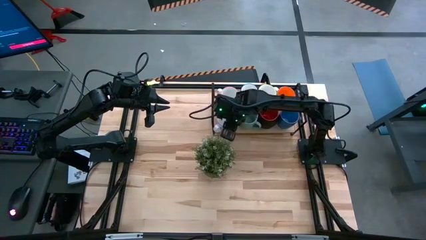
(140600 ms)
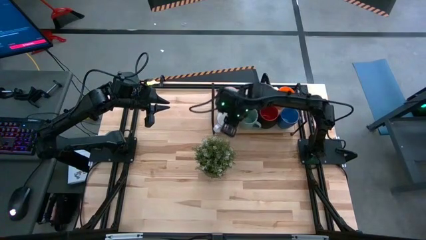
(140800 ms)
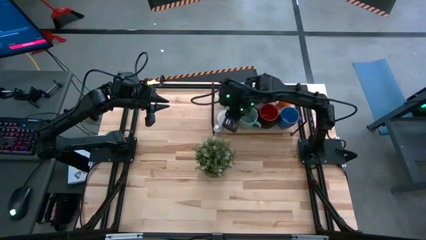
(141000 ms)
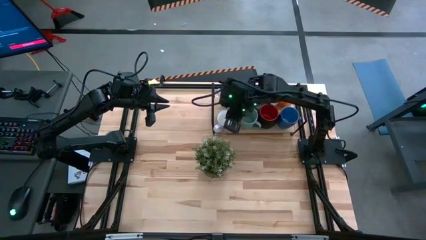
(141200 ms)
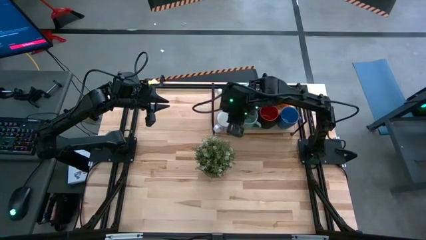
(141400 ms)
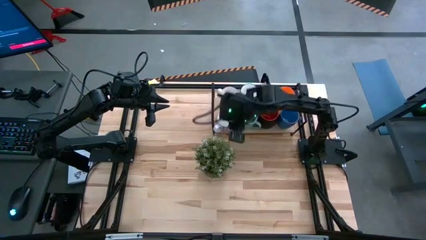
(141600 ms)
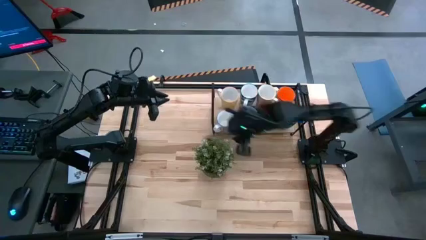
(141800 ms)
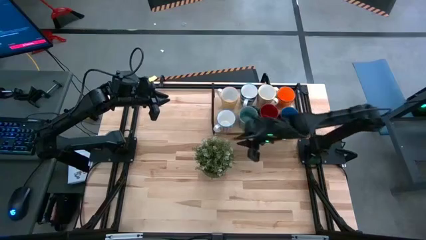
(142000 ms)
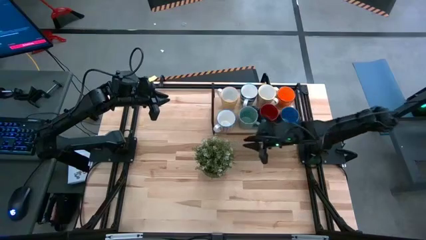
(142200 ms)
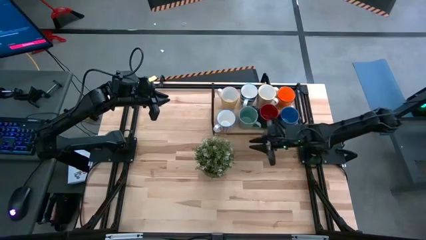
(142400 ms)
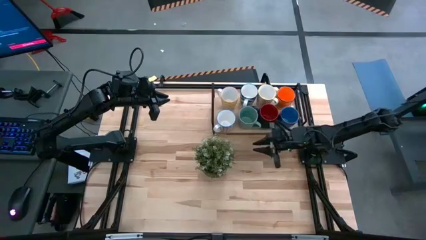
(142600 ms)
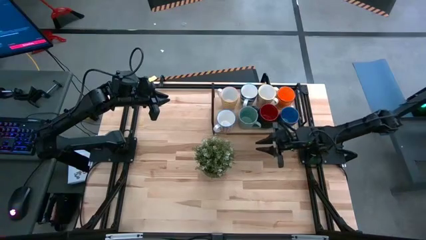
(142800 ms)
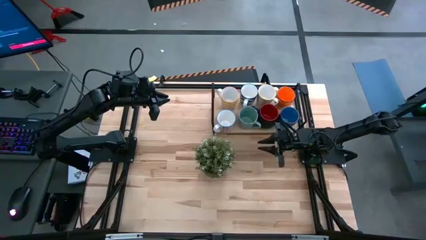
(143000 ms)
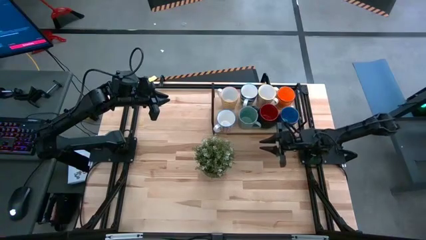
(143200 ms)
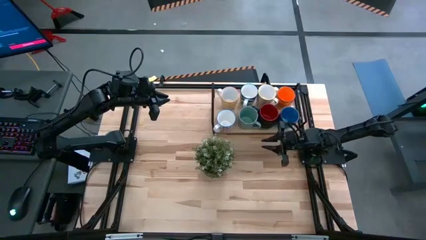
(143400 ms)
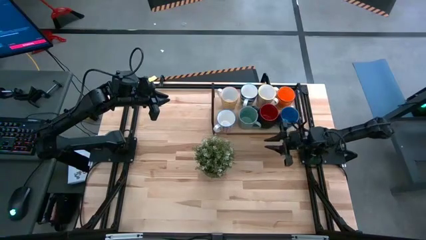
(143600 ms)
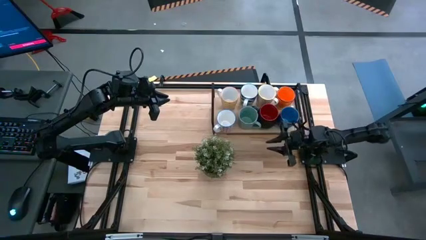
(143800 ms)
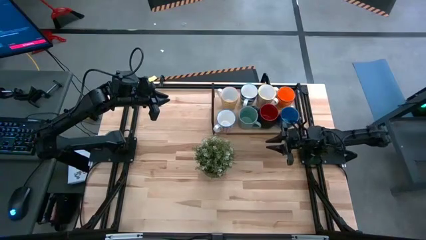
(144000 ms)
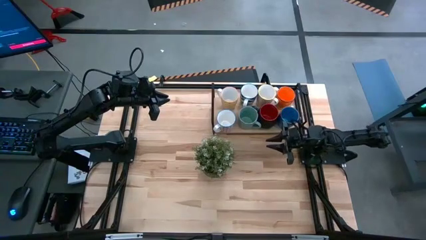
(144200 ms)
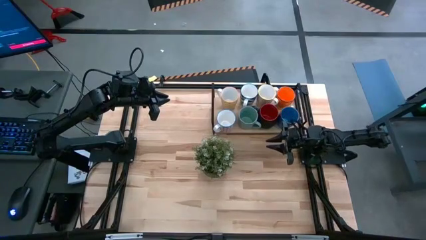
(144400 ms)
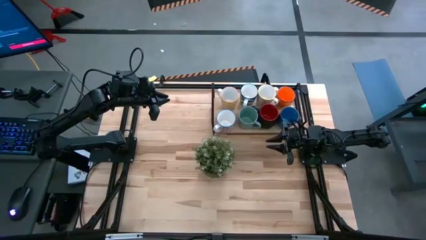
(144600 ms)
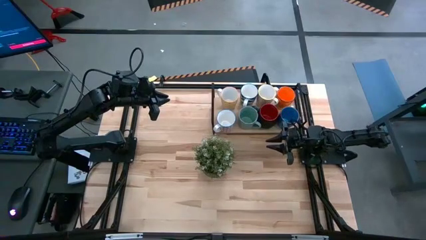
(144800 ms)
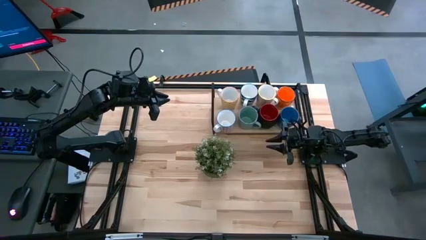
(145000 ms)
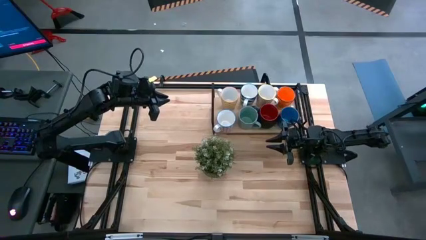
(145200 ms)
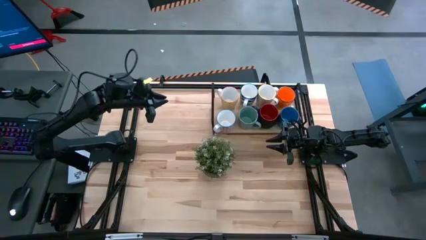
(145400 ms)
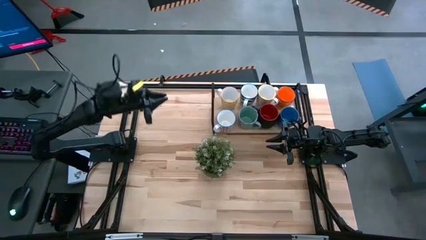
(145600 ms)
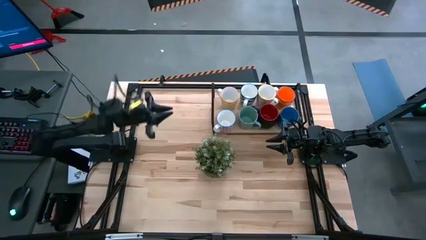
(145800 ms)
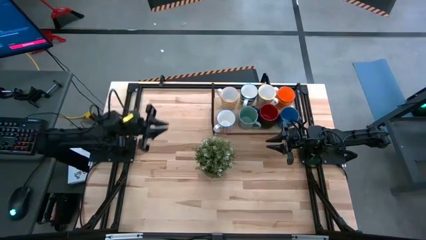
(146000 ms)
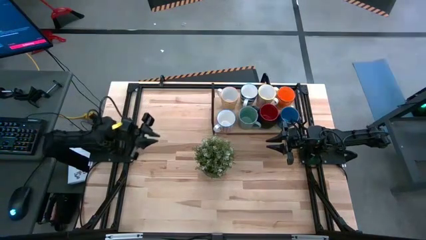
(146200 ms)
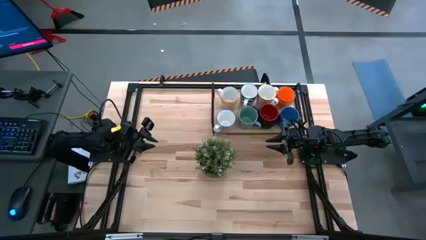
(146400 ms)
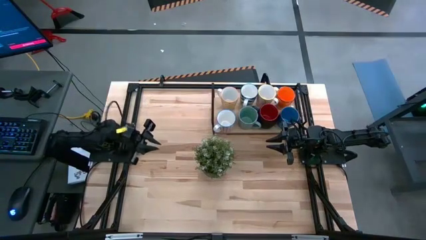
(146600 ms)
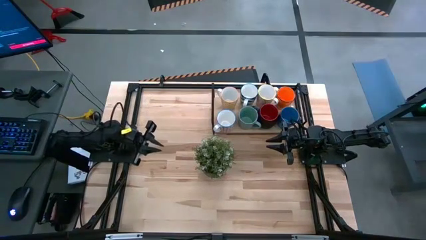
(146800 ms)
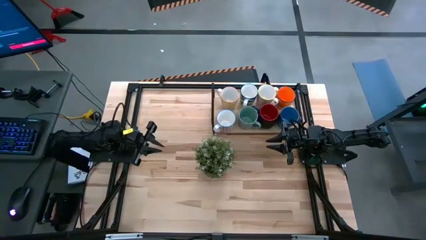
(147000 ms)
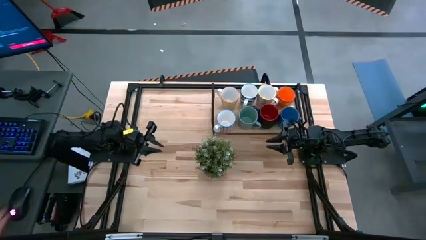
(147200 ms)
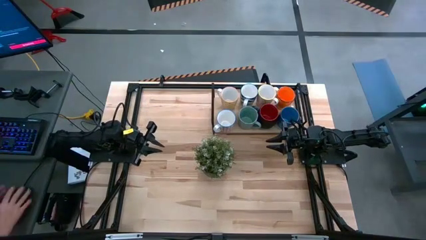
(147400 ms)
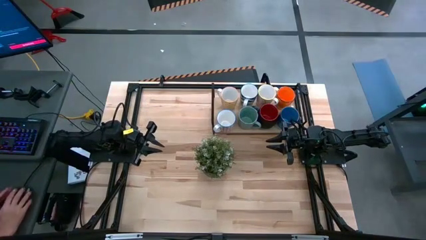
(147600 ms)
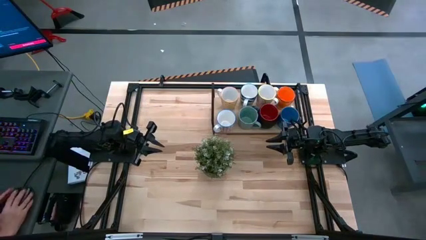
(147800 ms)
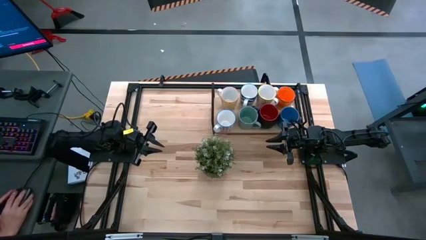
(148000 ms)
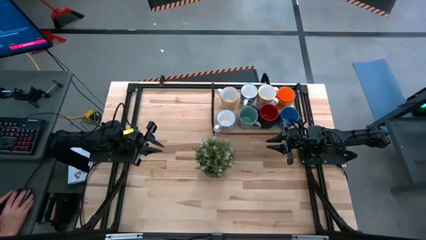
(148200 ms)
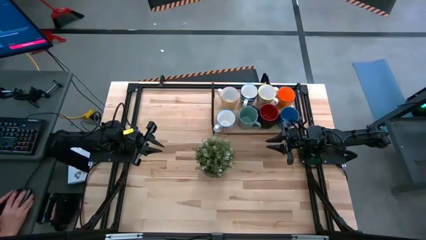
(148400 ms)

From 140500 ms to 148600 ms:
Task: Place coffee mugs
Return to Home Position

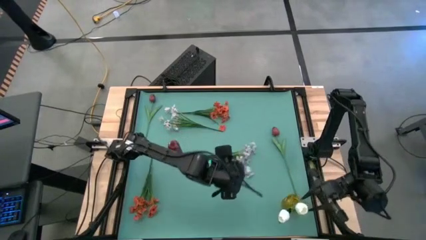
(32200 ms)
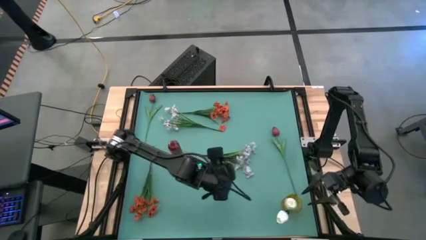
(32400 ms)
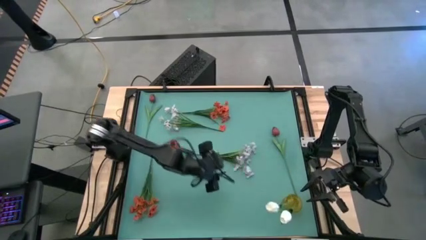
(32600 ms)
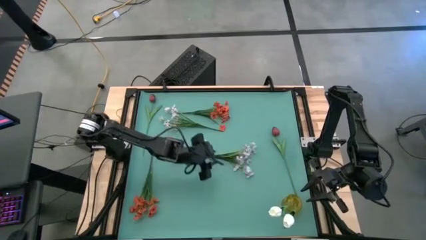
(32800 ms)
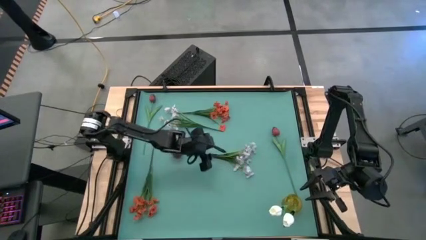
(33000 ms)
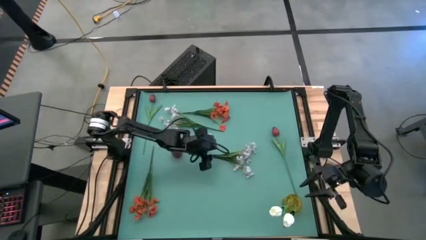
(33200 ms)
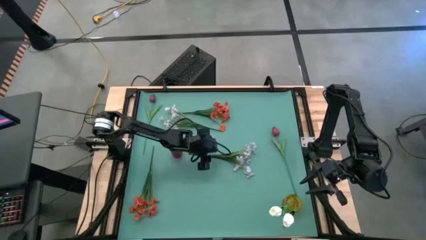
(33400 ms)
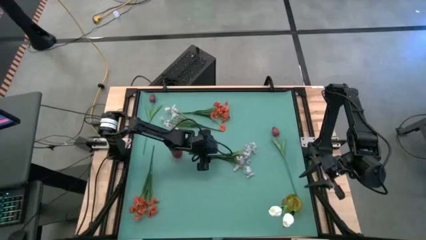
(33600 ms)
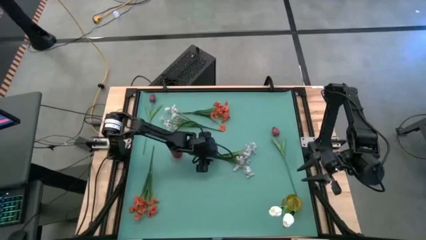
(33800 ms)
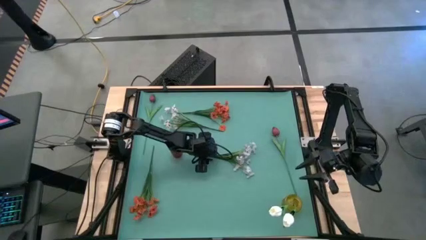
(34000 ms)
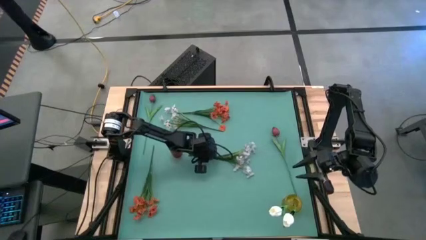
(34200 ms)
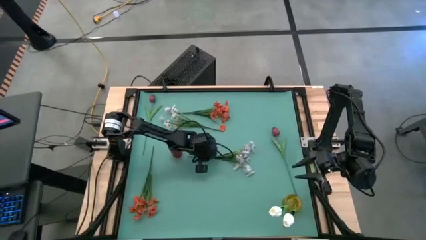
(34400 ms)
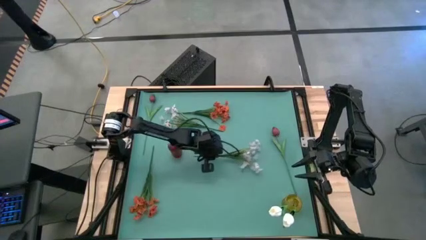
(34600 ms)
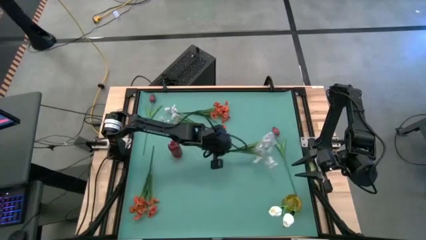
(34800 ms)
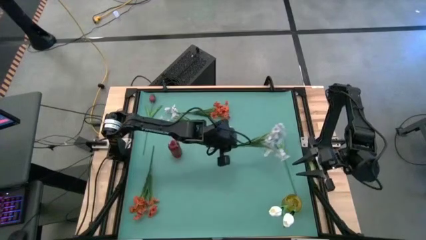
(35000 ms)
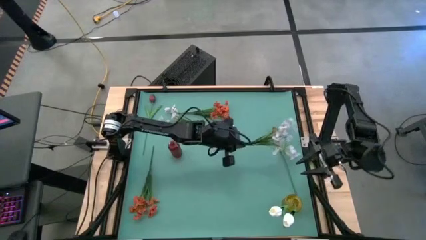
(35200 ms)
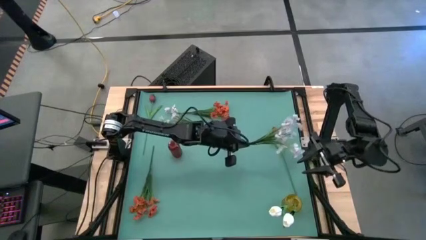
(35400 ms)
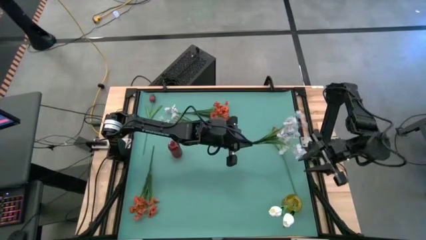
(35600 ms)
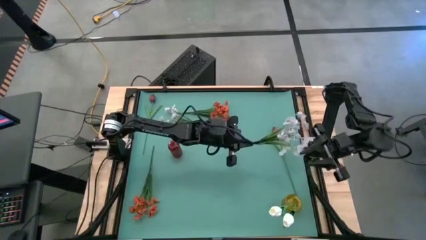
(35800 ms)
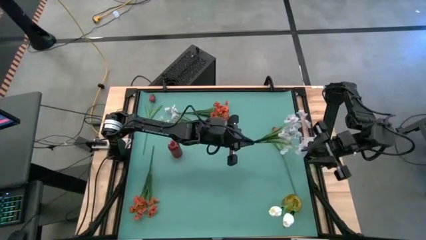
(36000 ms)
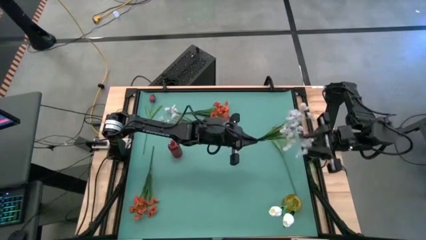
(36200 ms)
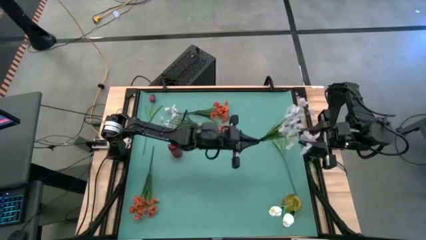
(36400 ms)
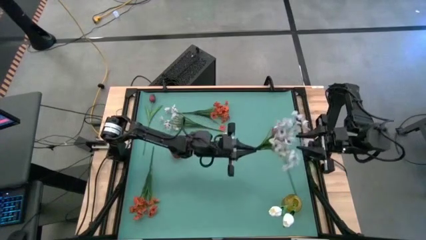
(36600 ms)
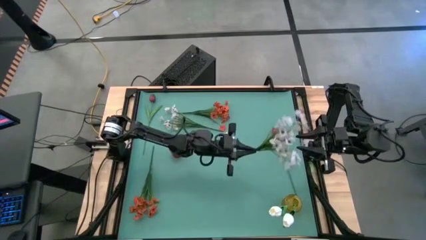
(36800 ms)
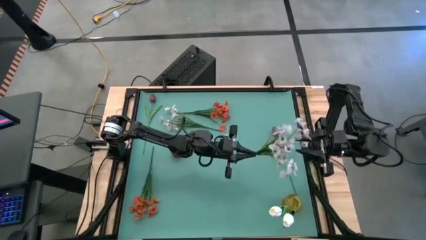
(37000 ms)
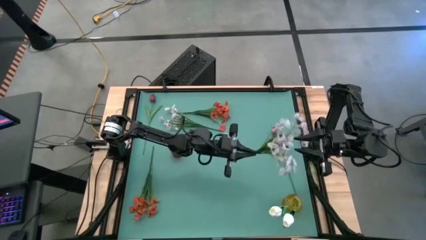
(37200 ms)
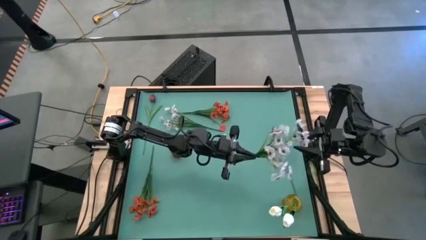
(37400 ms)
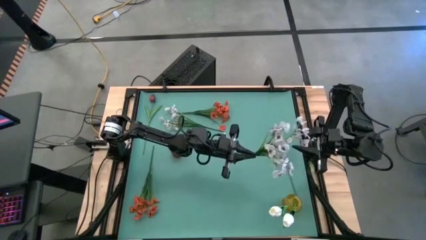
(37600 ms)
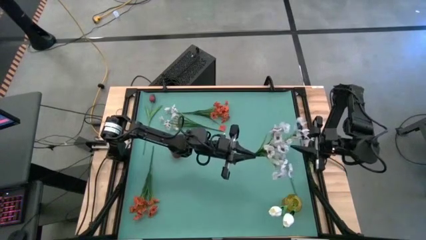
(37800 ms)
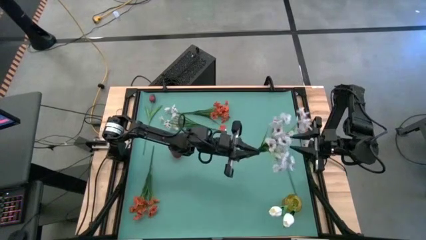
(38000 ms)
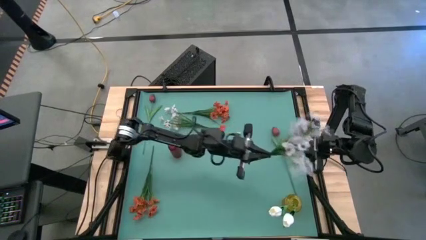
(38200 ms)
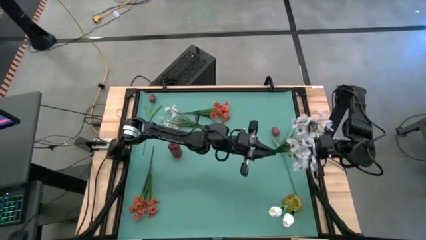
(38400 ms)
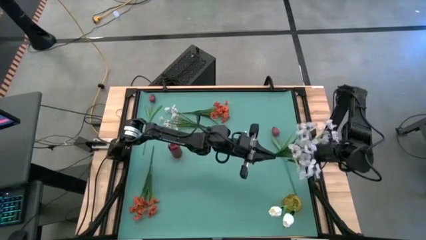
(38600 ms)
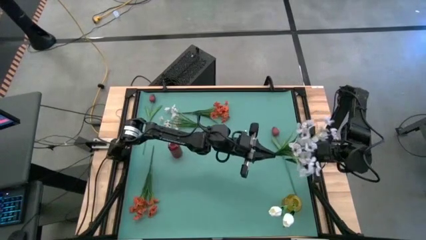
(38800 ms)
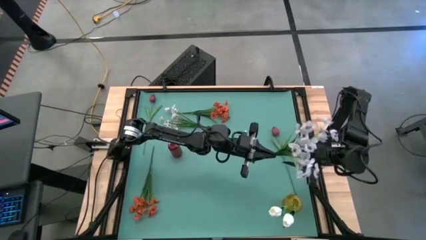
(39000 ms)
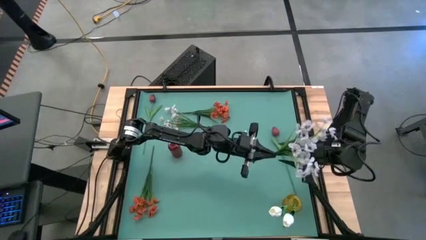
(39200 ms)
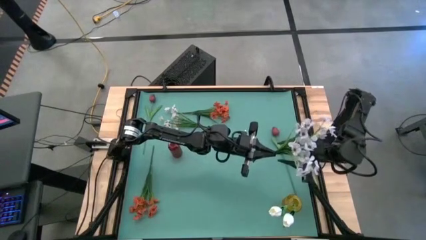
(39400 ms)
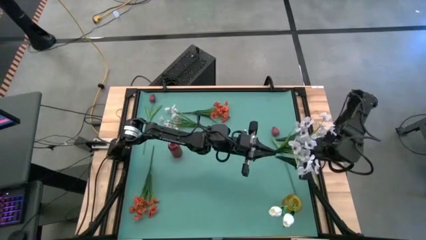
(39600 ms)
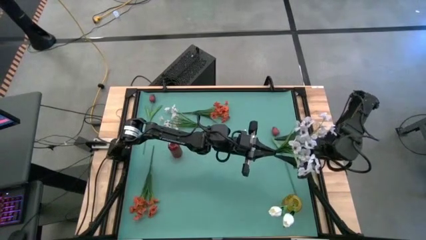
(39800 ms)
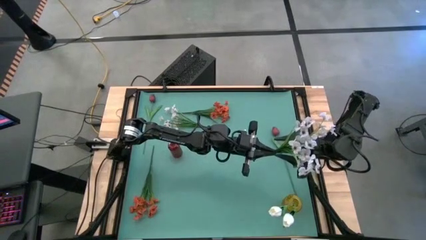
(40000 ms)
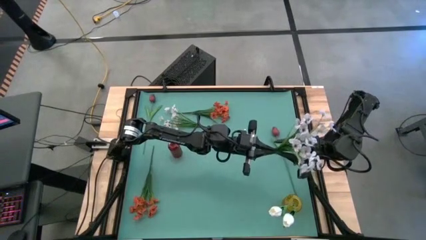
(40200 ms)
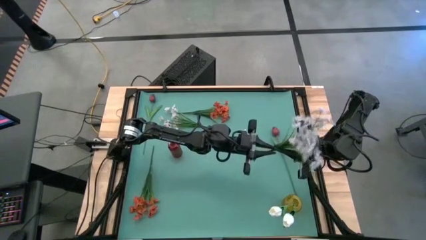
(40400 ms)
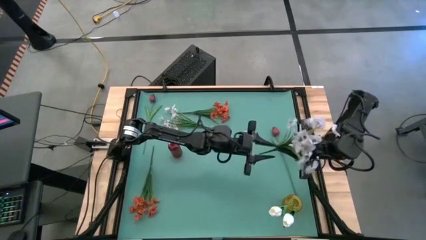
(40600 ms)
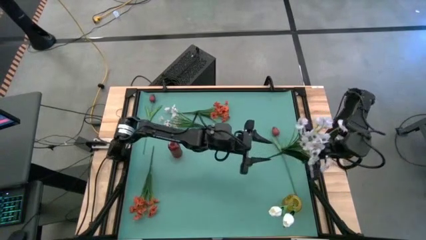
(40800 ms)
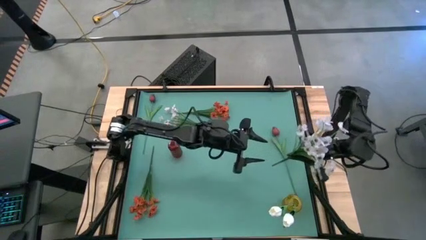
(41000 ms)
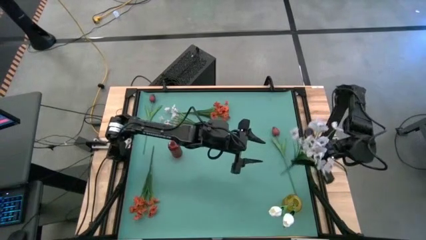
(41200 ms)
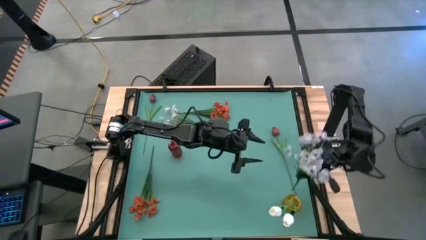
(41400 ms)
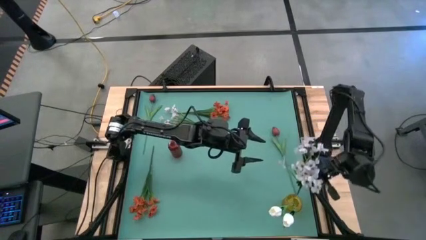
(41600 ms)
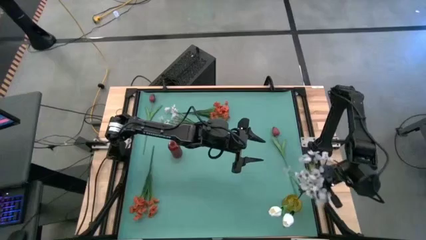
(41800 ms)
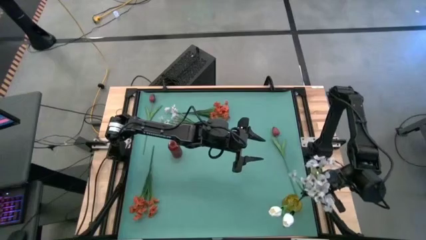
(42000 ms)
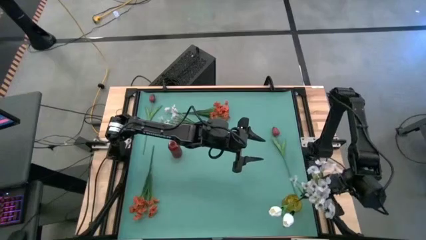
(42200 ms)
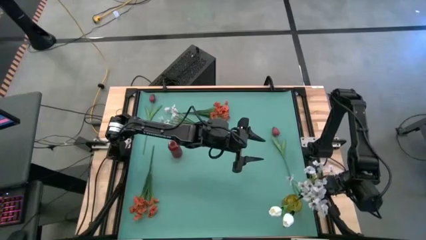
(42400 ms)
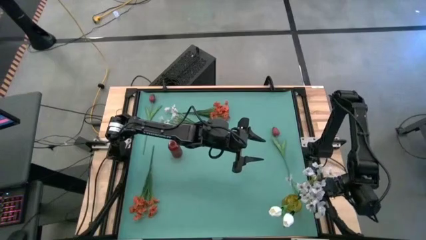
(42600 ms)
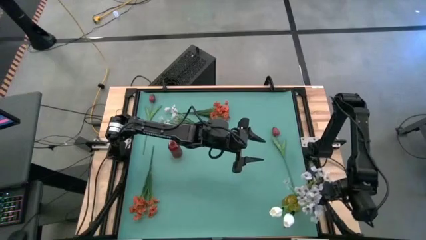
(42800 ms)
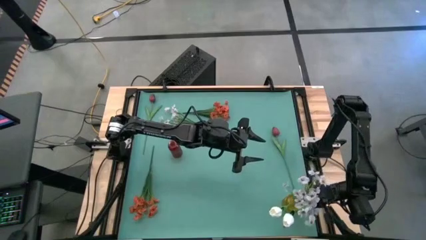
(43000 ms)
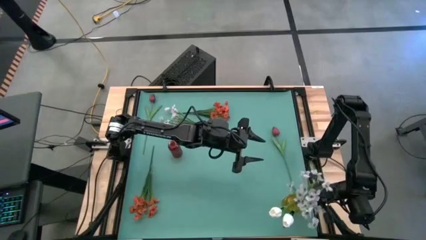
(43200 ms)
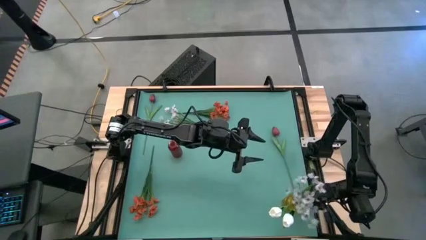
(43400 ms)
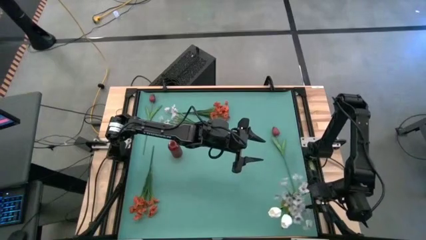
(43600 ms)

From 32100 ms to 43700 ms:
Task: Sort flowers into vase by color
Put the bottom white flowers into the yellow vase
